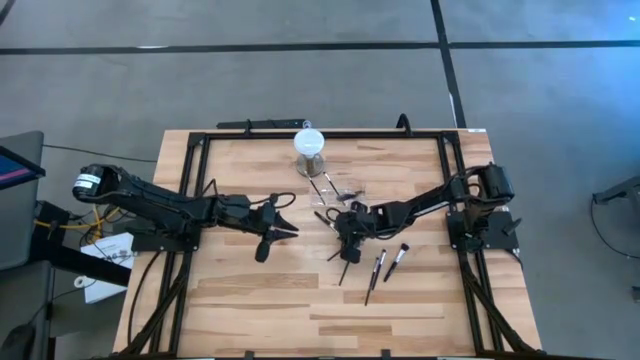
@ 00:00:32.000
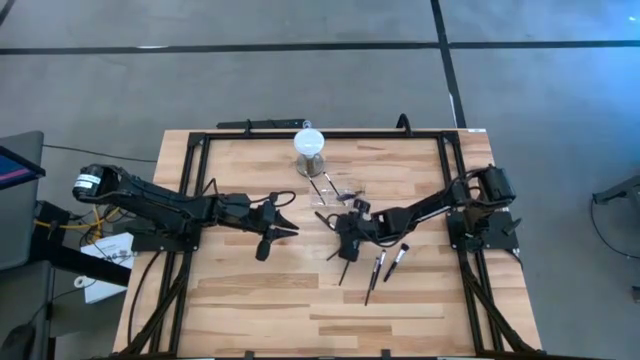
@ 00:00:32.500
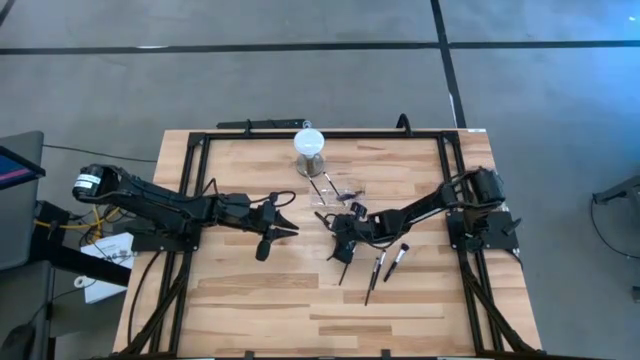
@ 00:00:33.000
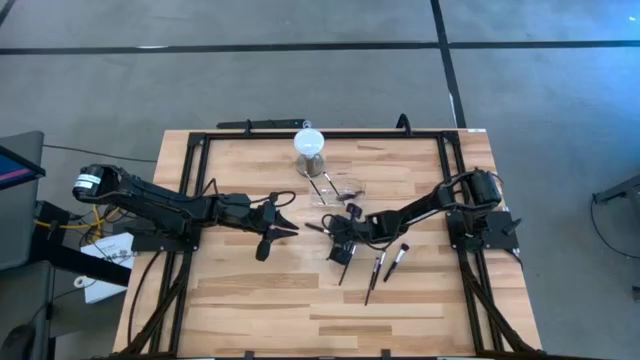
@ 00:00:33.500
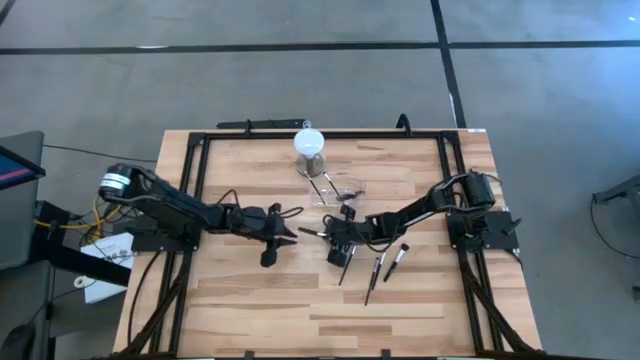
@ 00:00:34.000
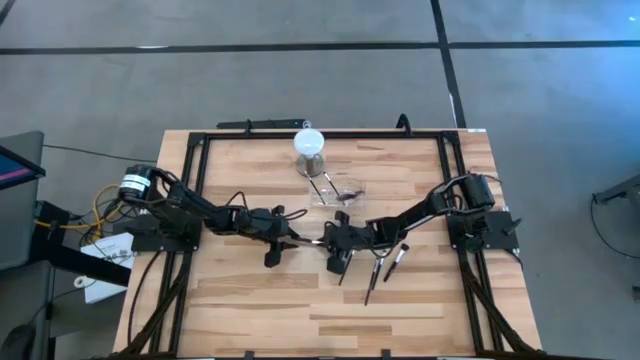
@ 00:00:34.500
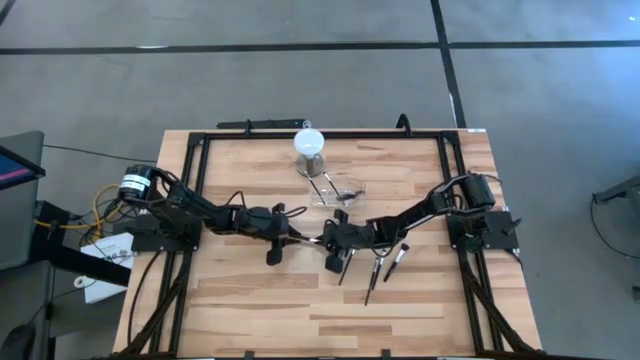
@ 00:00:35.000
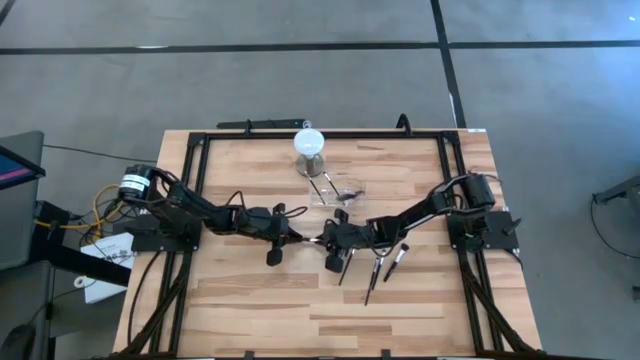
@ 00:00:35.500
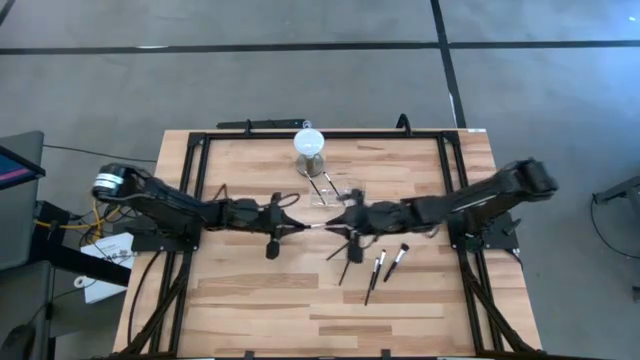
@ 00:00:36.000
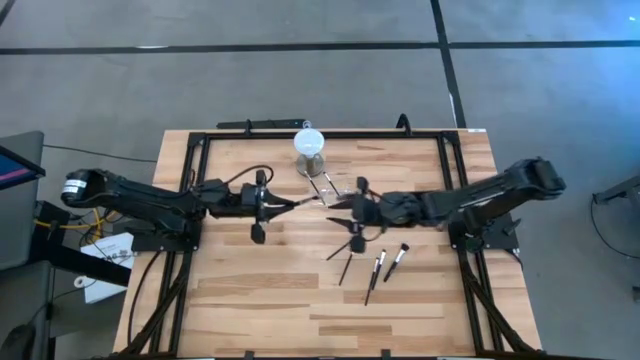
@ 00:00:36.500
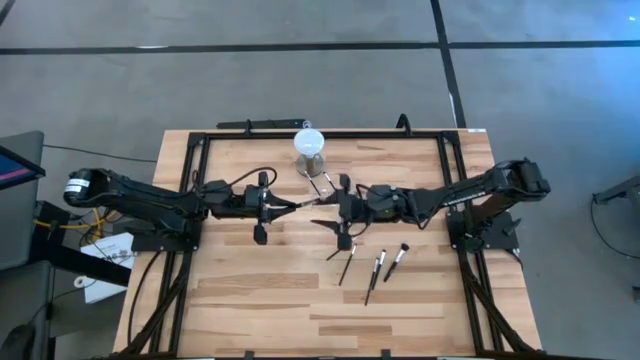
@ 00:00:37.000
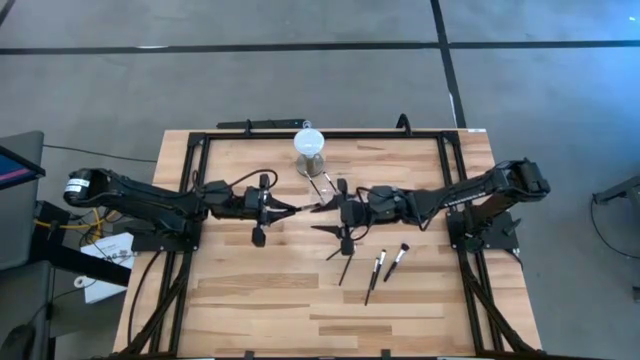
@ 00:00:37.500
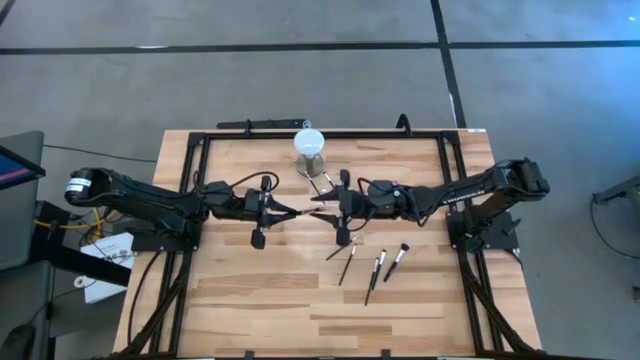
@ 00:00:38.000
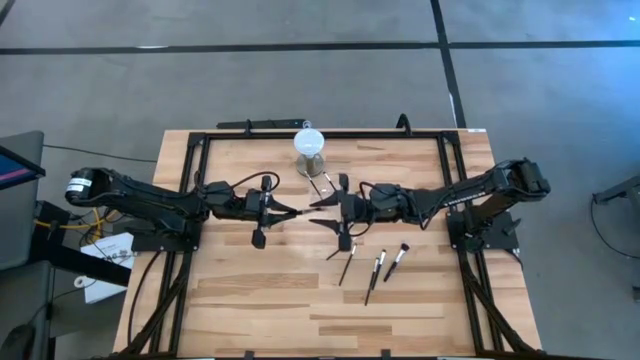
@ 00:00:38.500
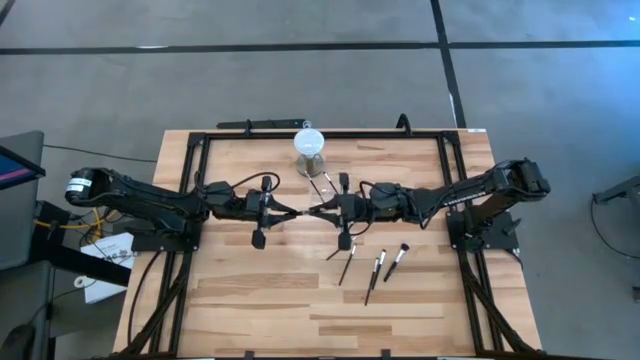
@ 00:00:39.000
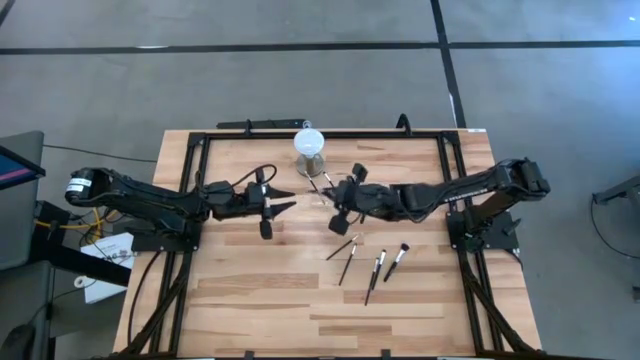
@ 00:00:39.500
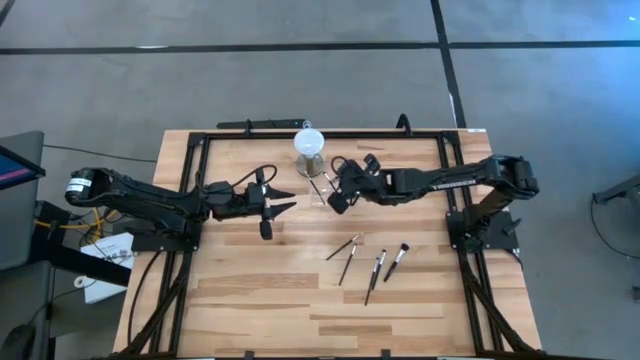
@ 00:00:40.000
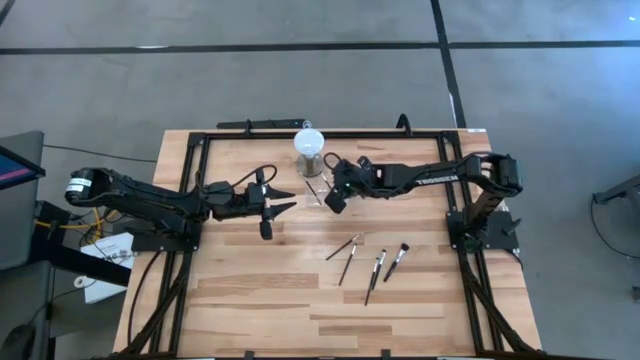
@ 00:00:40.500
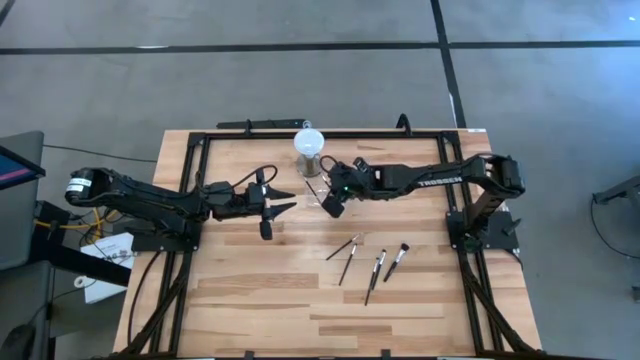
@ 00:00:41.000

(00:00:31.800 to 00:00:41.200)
Task: Put items in baskets/containers
Put the black foundation brush into the transparent organizer

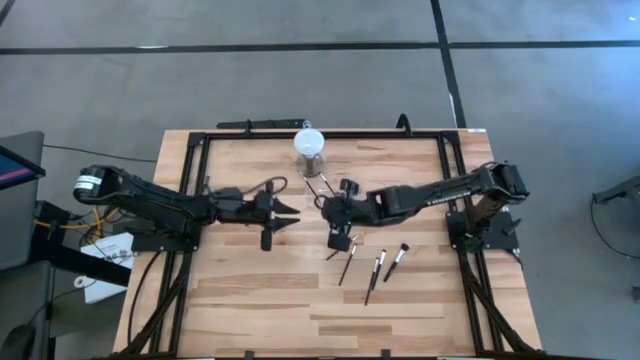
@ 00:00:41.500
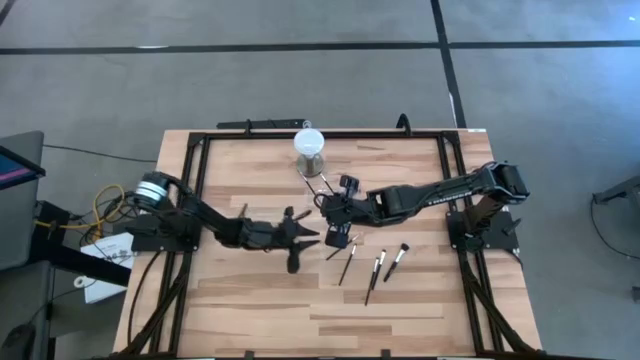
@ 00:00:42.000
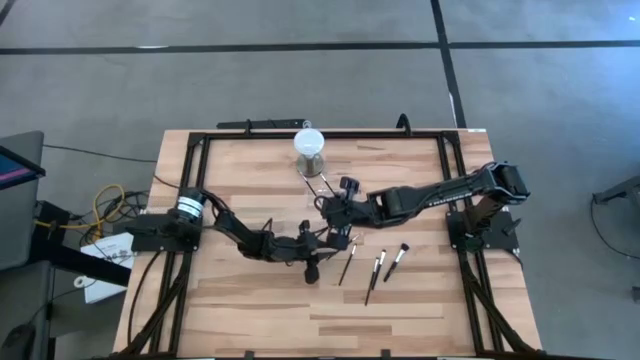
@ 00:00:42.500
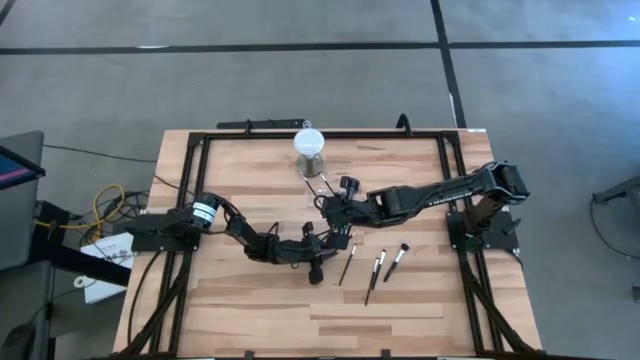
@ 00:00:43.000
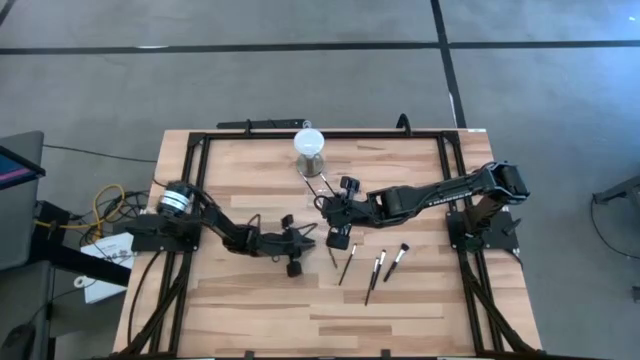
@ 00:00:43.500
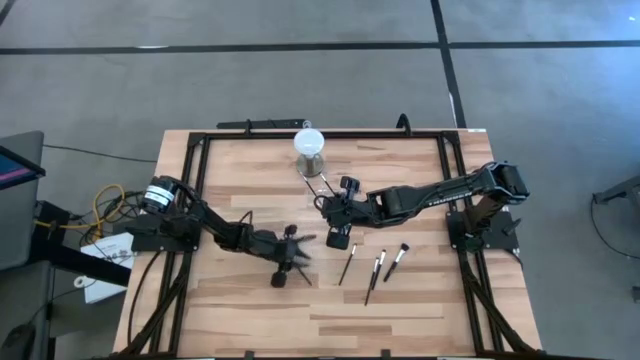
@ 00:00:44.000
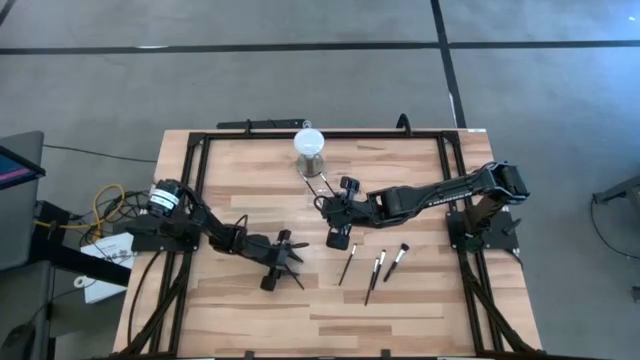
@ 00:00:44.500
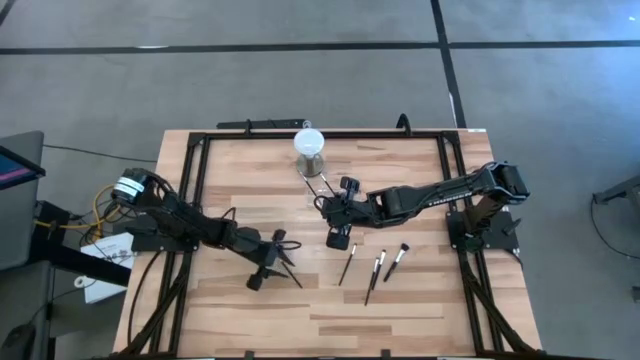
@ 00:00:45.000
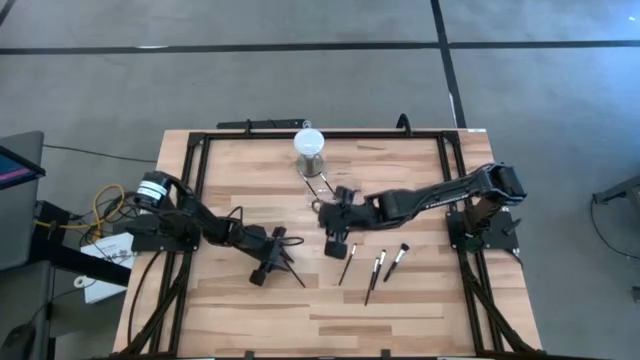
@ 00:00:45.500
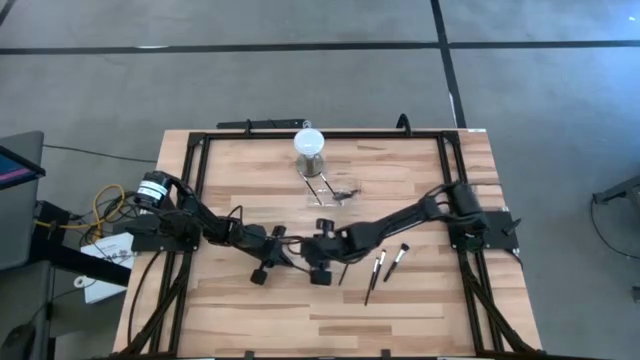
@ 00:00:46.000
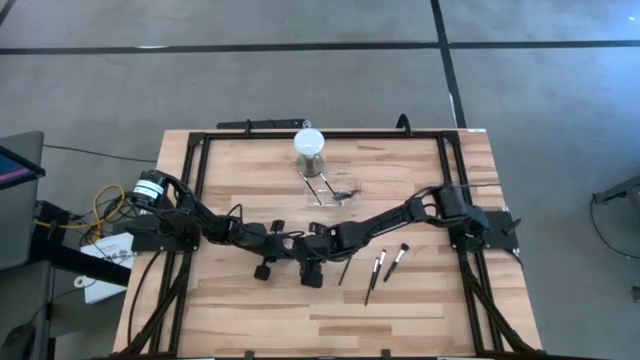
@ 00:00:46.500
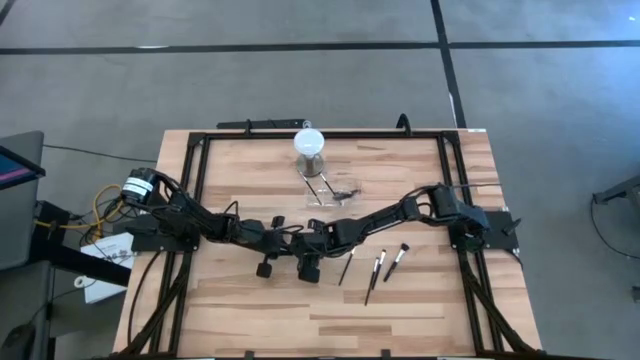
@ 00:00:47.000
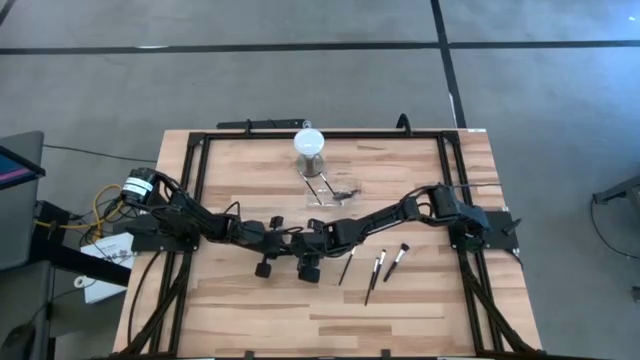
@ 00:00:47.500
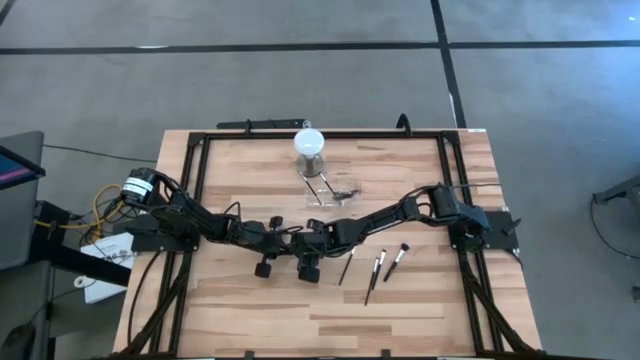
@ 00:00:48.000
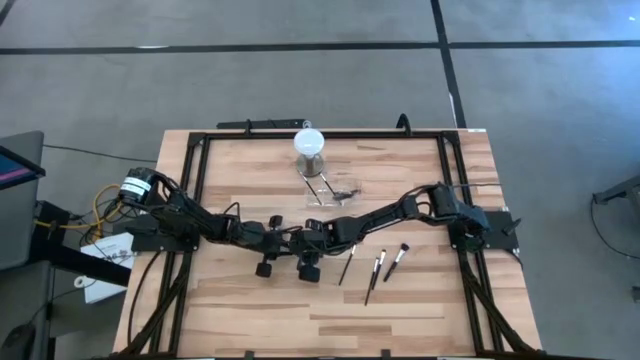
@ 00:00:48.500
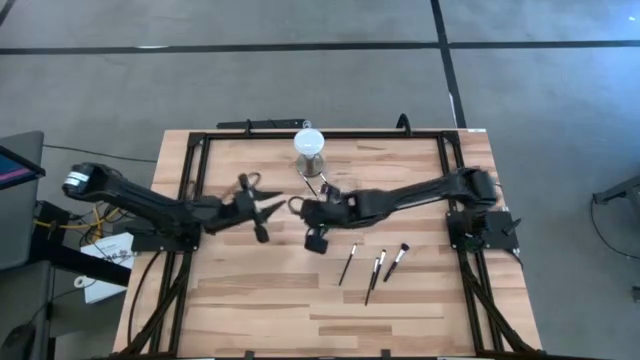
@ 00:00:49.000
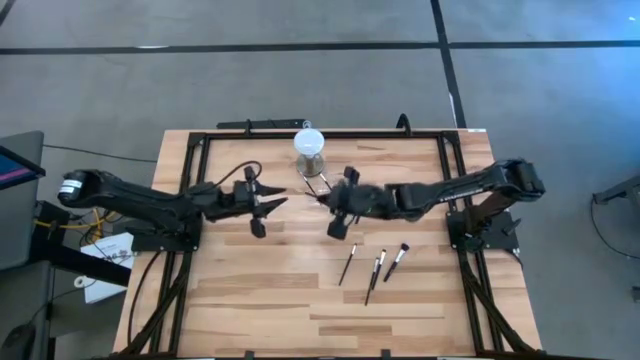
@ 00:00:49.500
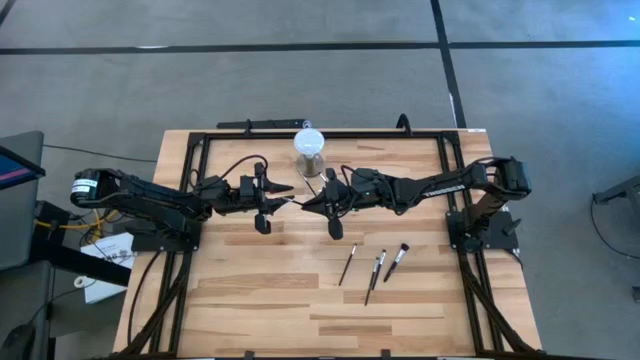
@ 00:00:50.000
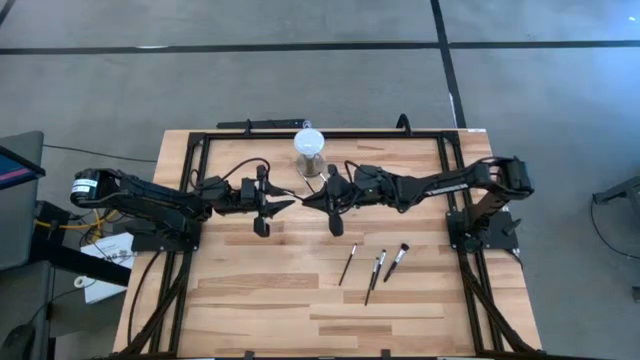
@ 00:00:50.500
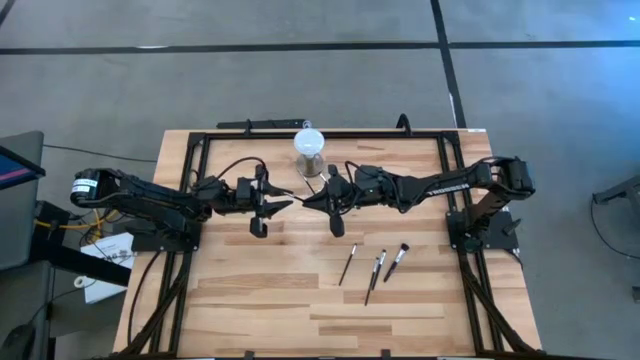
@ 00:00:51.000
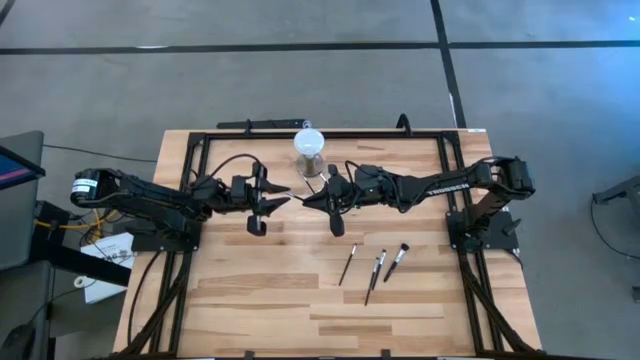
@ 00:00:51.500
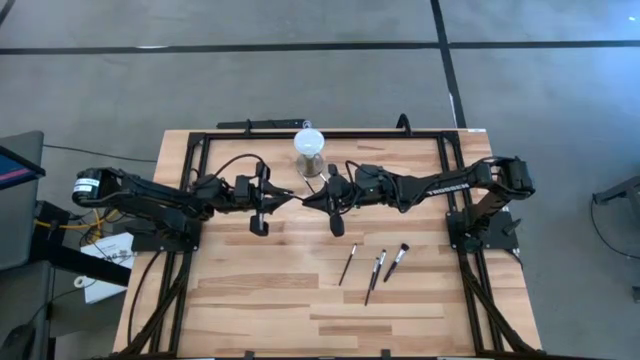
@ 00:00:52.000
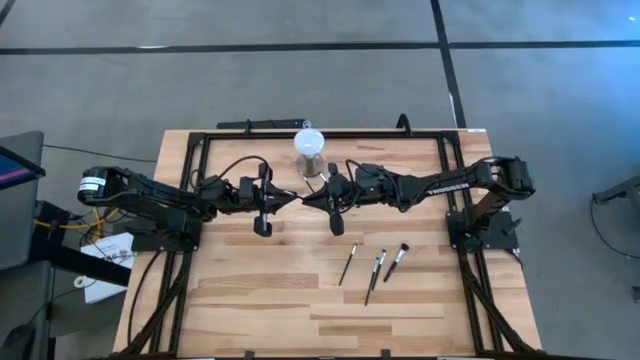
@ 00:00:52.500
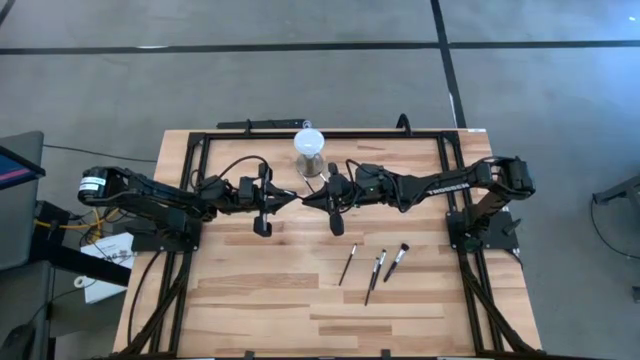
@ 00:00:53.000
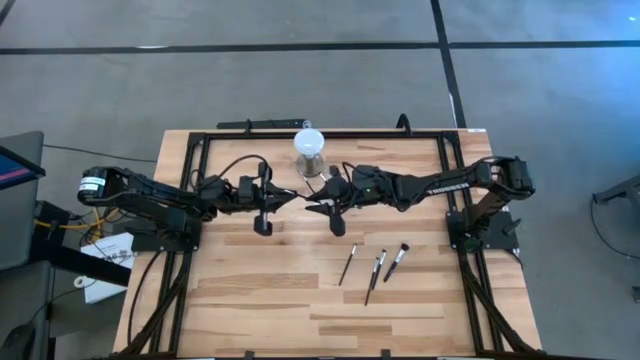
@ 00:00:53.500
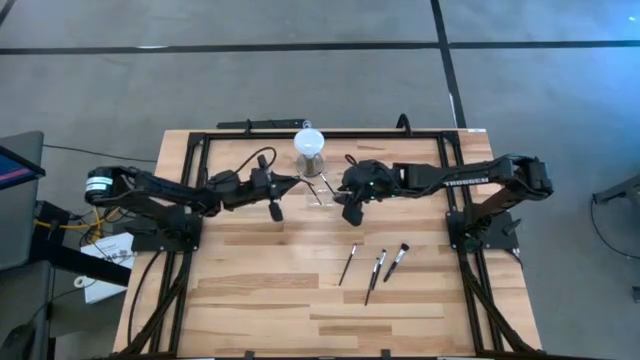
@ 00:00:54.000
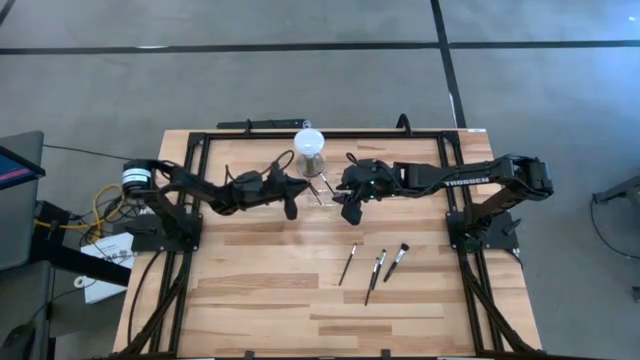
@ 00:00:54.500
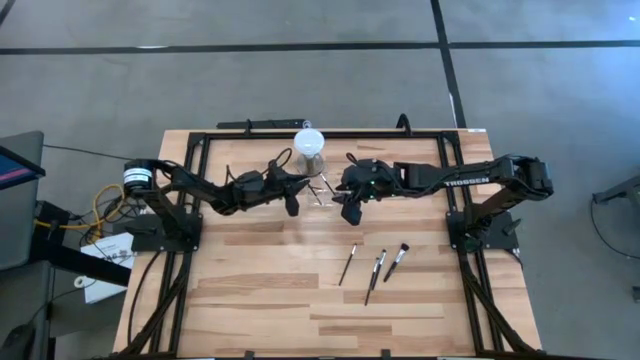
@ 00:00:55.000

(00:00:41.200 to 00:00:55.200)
Put the black liner brush into the transparent organizer
